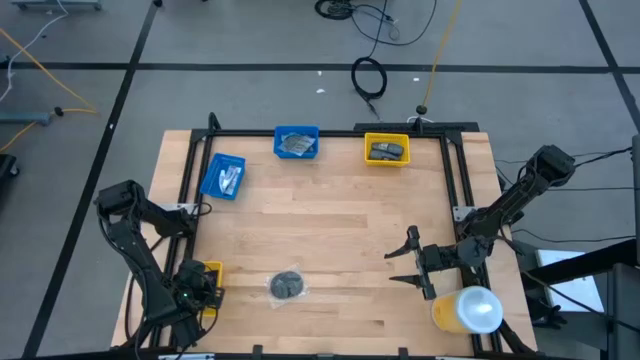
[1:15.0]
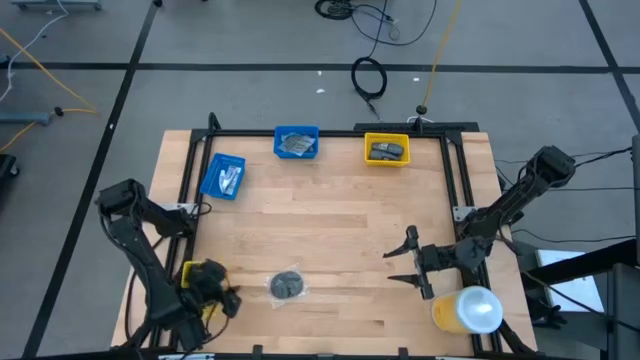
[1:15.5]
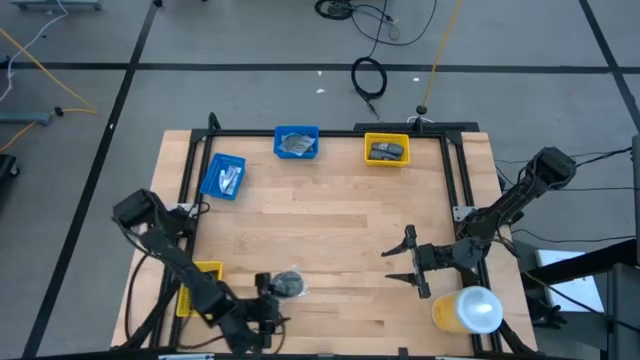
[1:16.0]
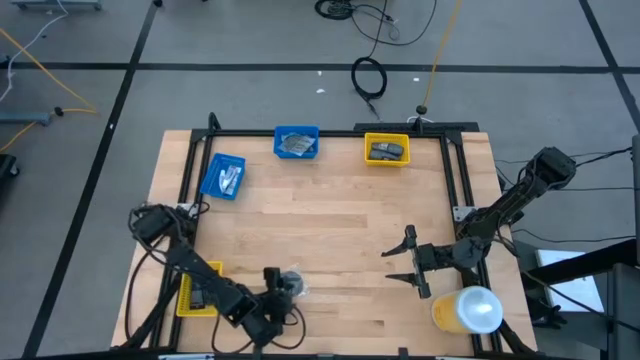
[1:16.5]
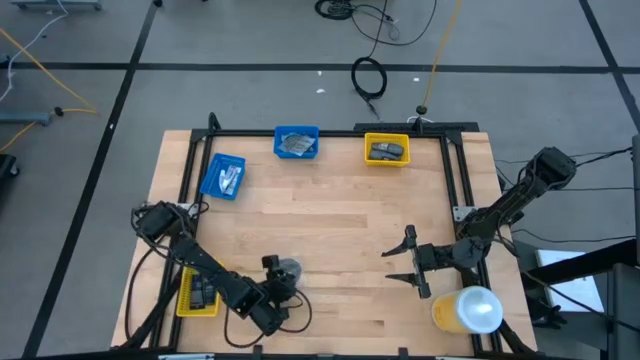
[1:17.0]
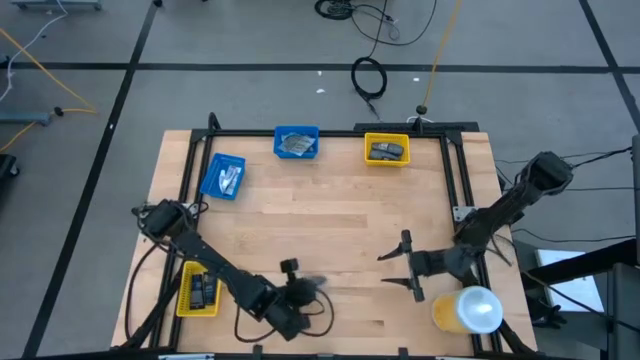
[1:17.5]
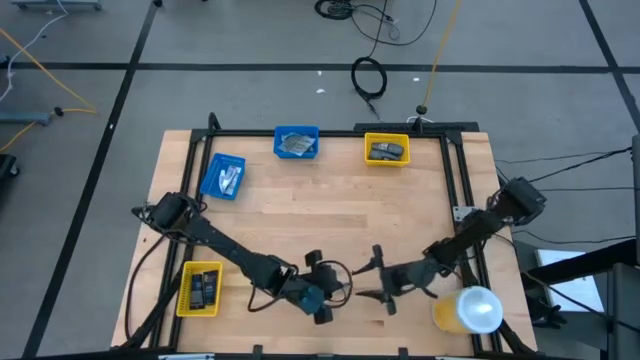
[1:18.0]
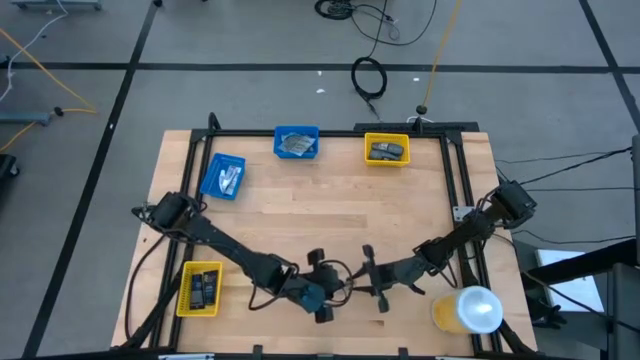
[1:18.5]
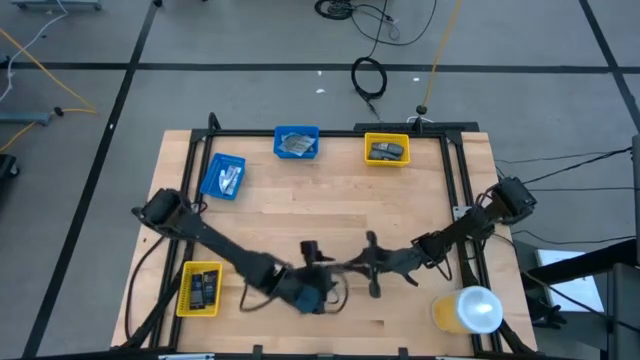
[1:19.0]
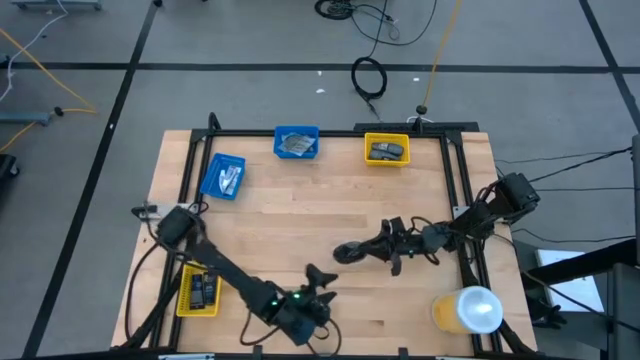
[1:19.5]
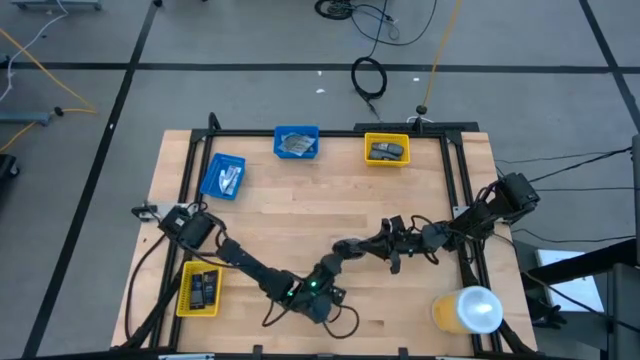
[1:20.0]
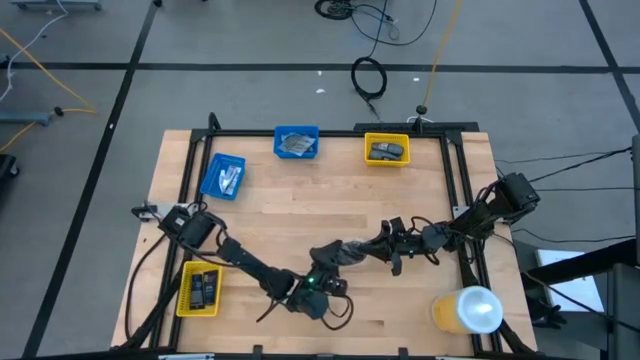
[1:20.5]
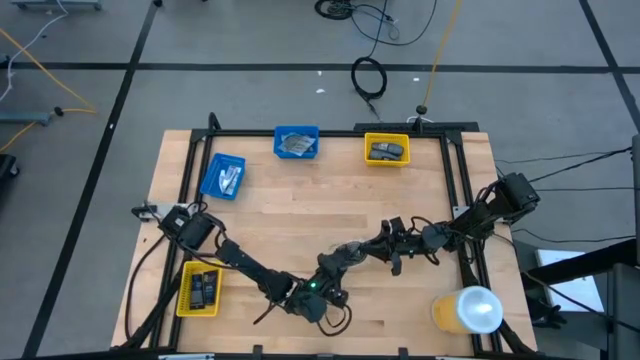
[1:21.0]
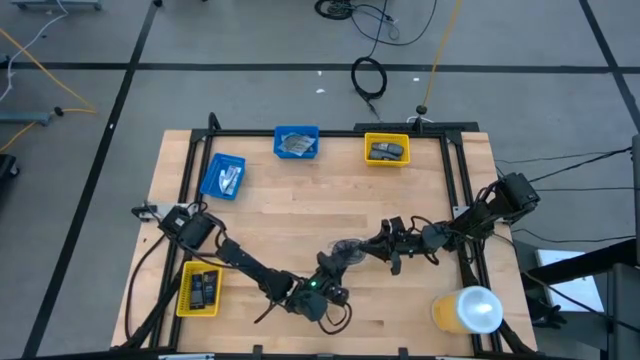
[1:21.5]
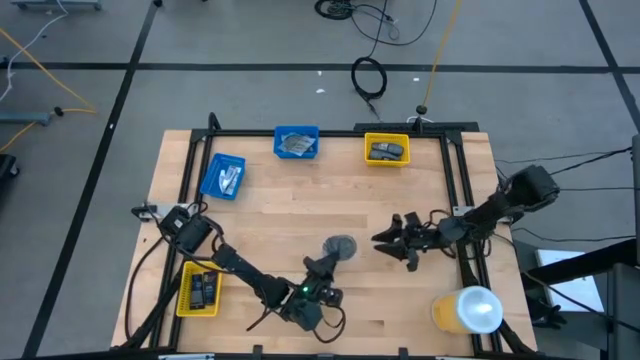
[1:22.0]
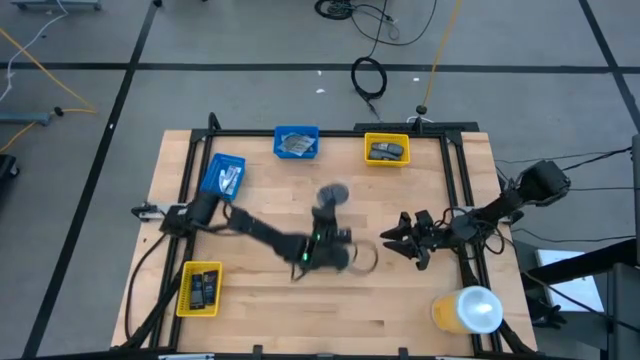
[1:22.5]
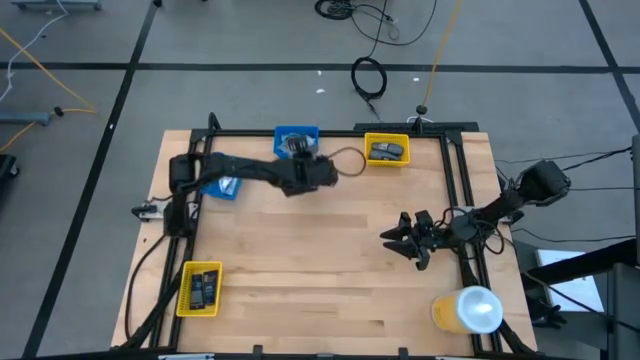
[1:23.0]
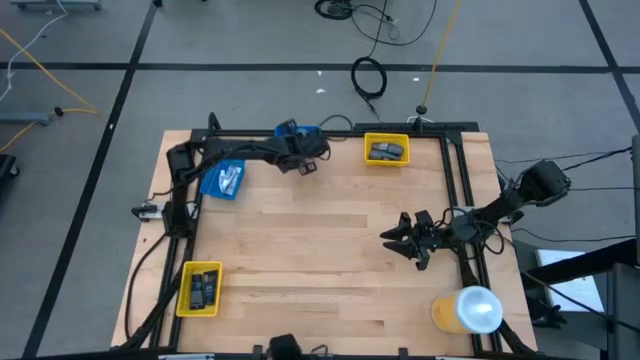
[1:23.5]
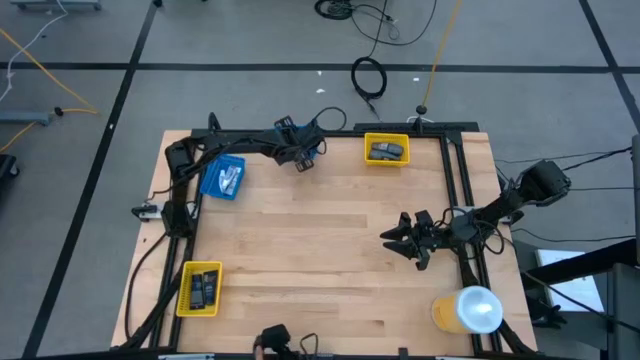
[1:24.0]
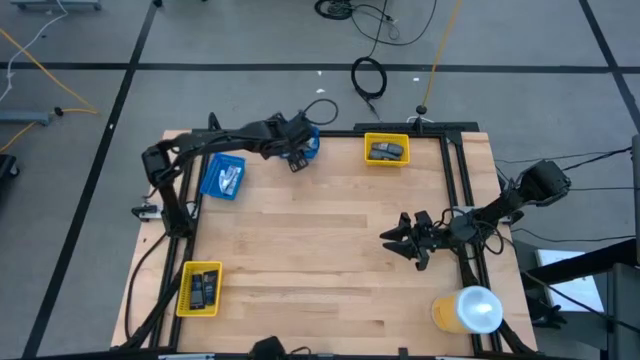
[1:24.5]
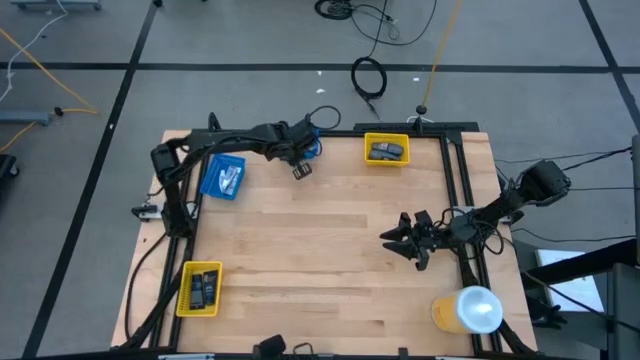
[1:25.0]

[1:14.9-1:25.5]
Task: Pick & Place Travel size toiletries
Put the black hairbrush into the right blue bin

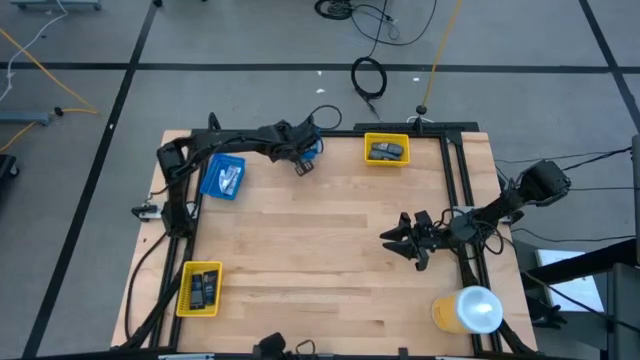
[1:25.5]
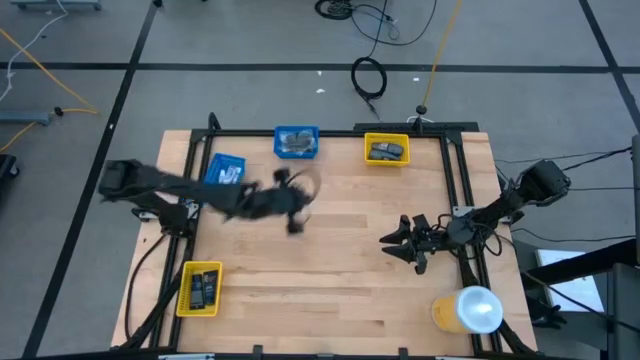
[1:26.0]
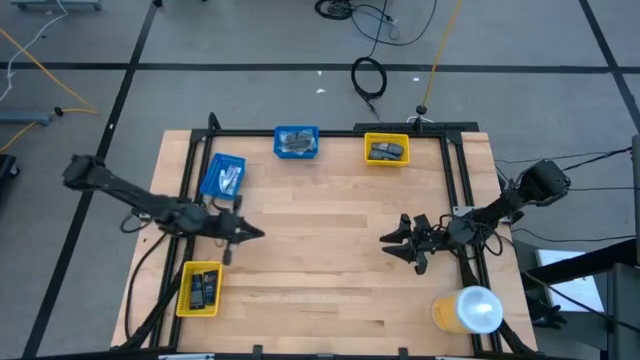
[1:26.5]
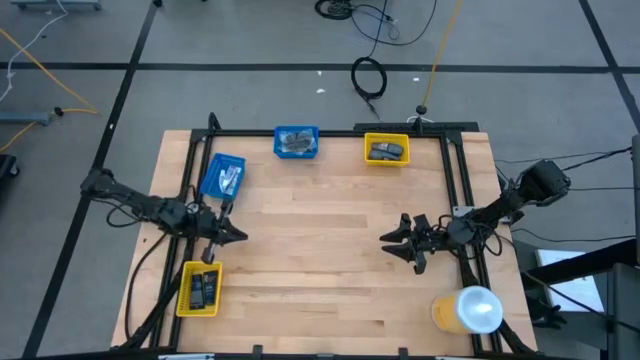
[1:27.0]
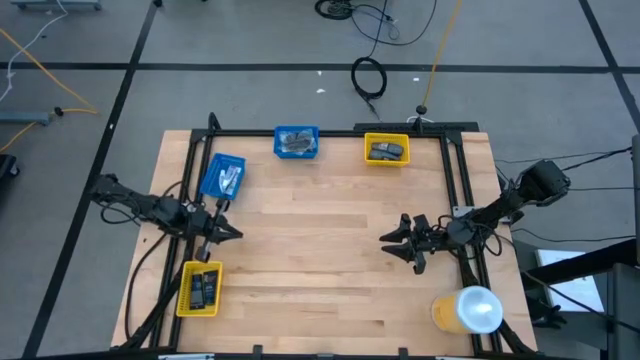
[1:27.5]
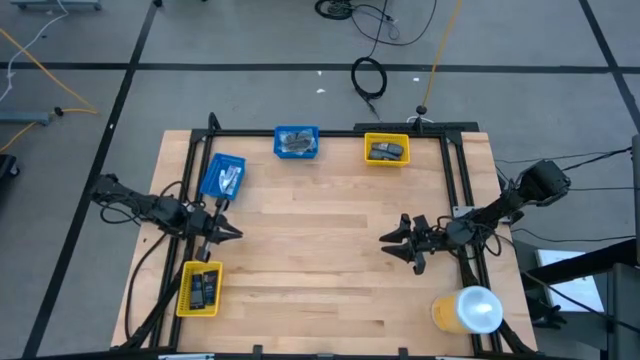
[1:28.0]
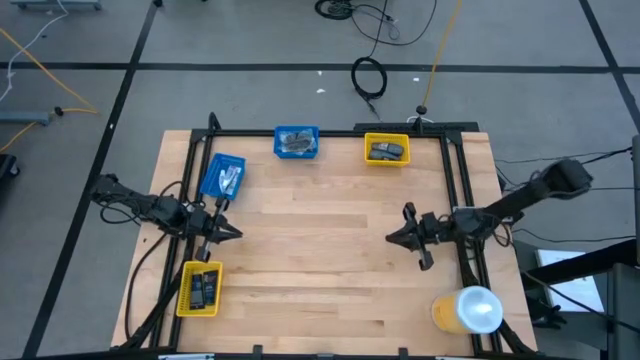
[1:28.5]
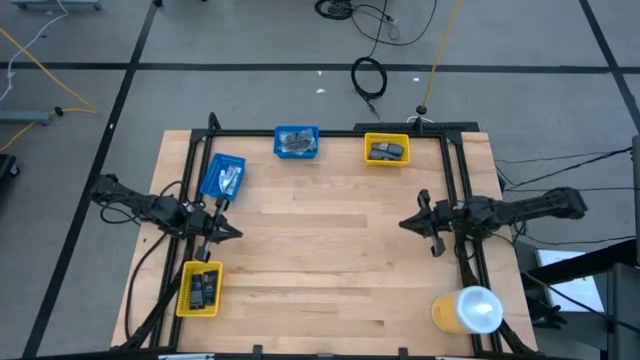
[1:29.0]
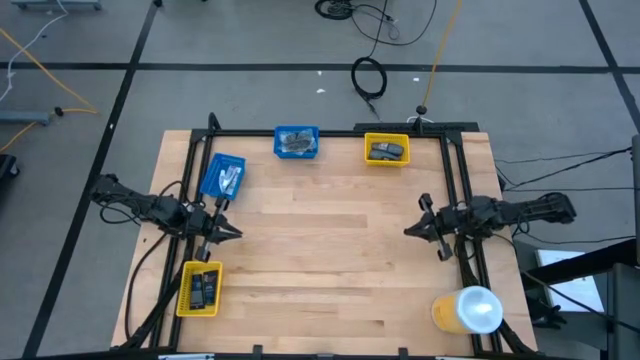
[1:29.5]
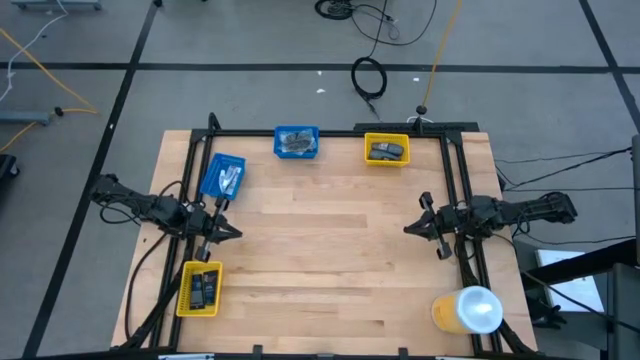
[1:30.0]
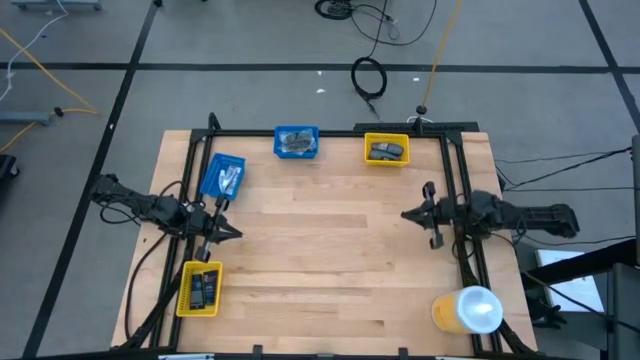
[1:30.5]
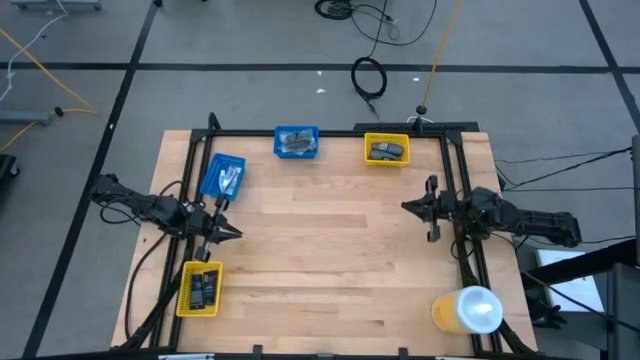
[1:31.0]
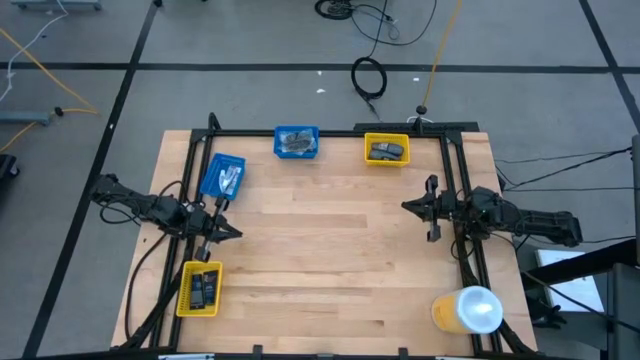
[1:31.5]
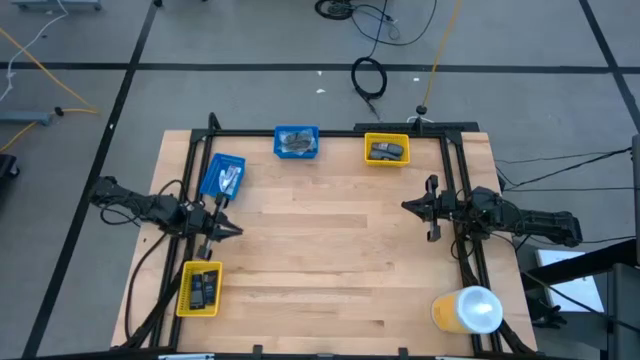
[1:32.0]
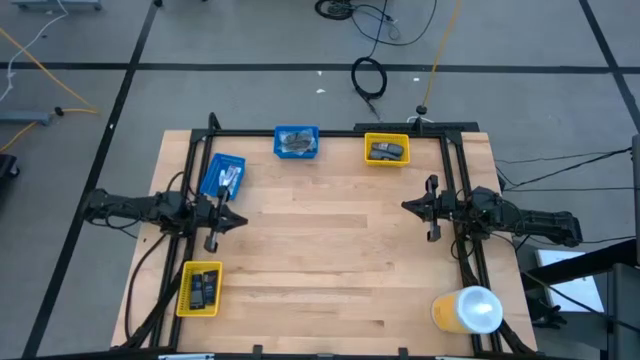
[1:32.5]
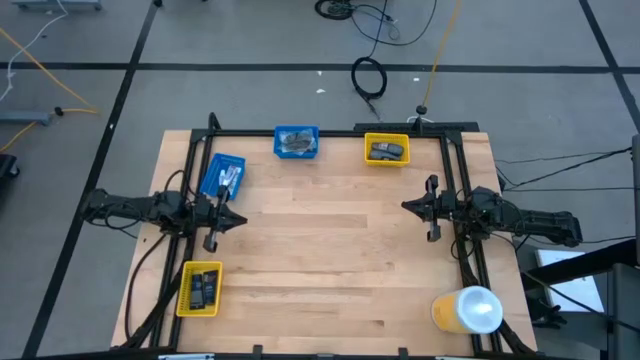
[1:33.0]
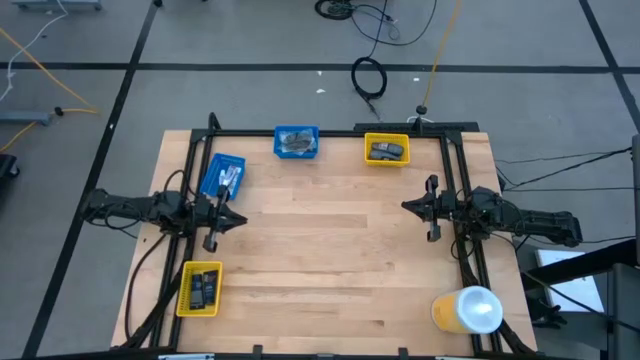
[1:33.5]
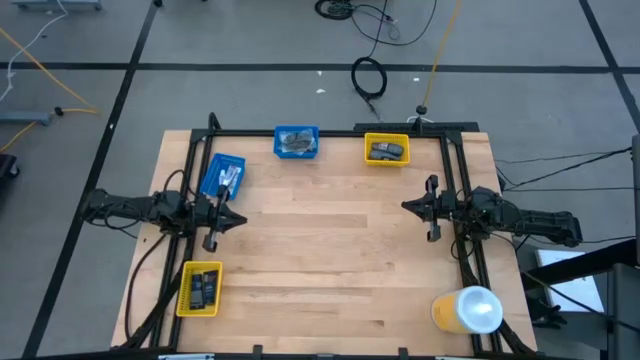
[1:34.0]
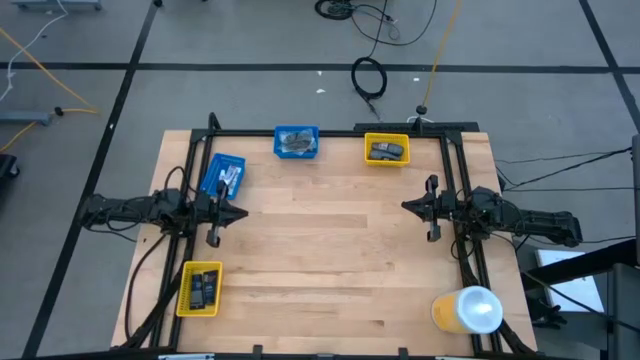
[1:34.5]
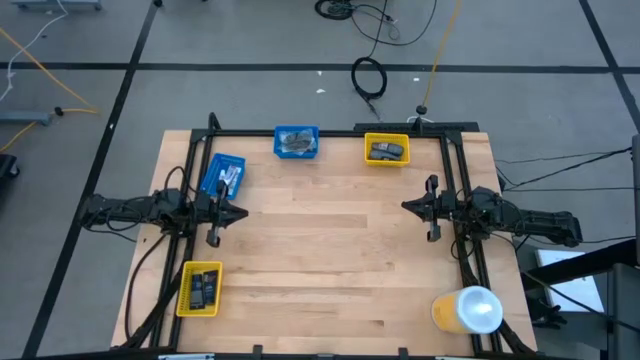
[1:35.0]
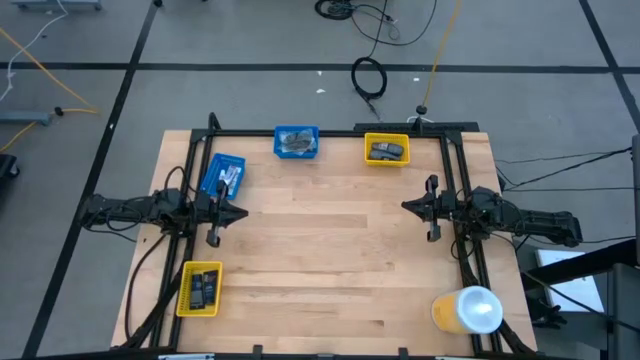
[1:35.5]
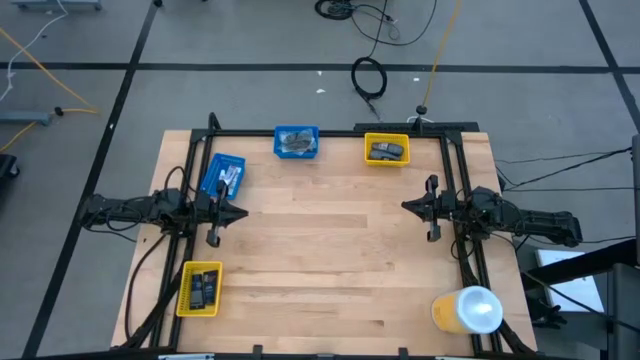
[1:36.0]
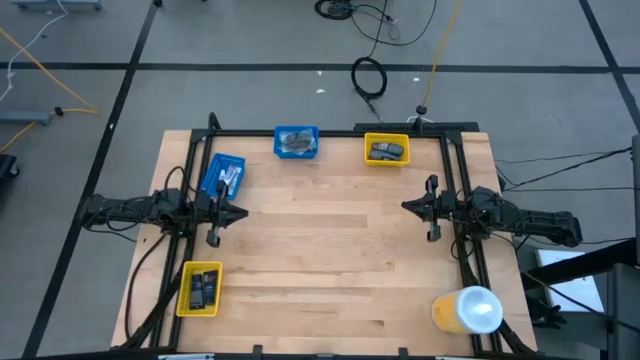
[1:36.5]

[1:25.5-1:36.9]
Return to Home Position
